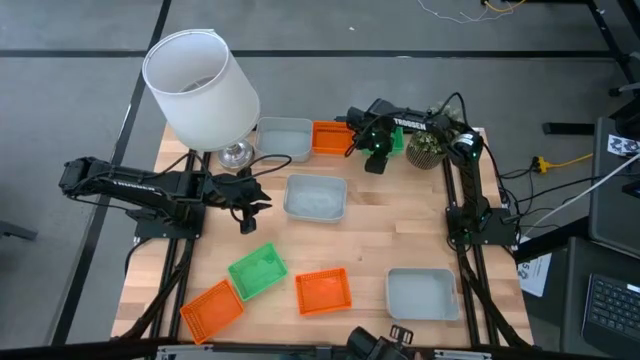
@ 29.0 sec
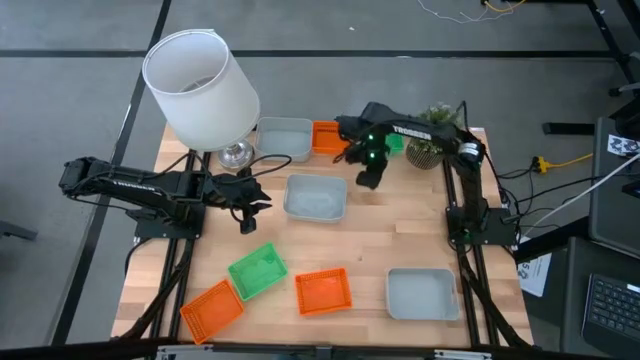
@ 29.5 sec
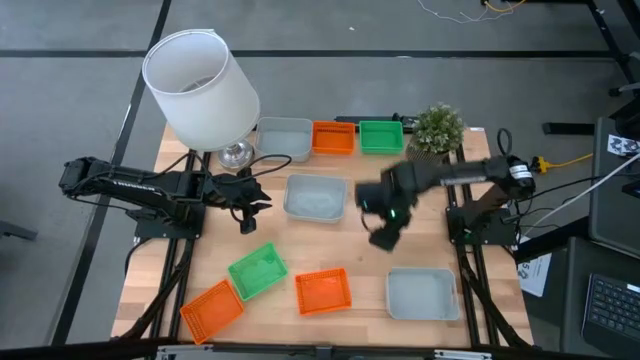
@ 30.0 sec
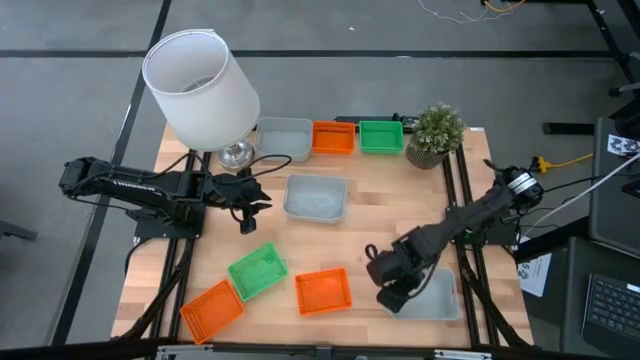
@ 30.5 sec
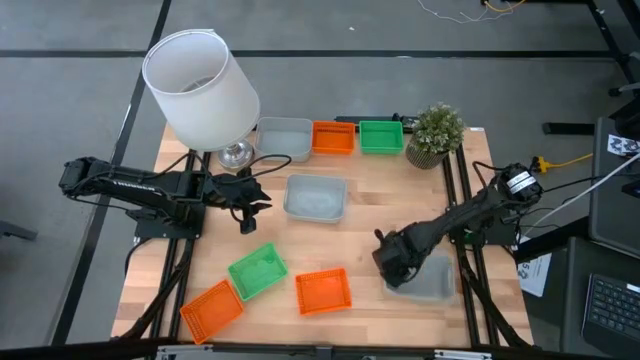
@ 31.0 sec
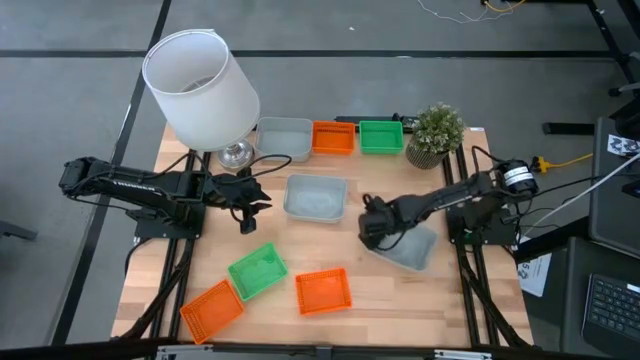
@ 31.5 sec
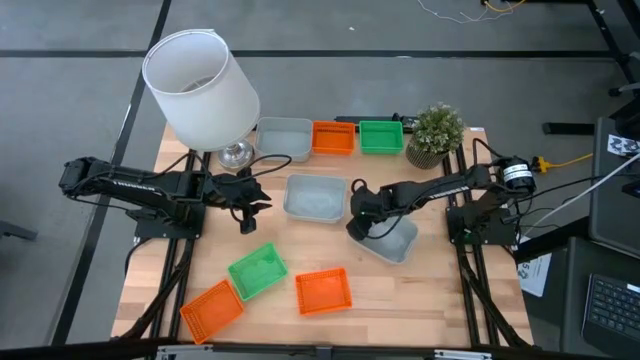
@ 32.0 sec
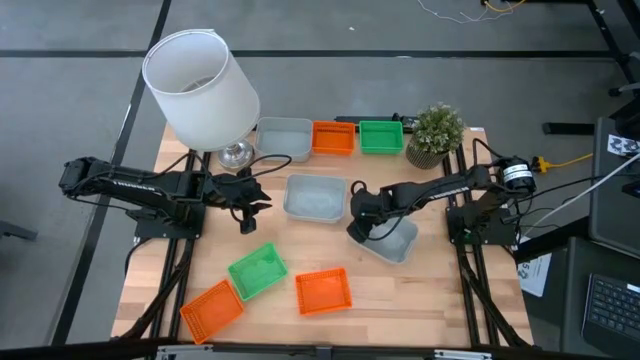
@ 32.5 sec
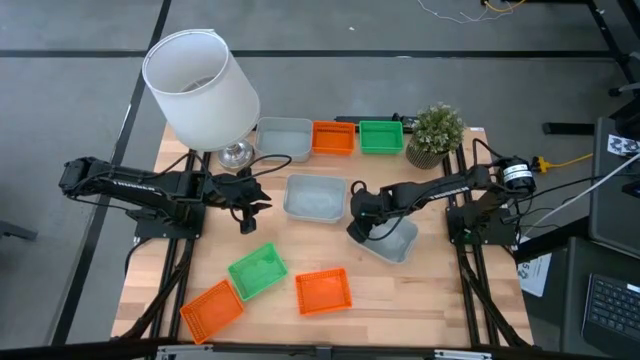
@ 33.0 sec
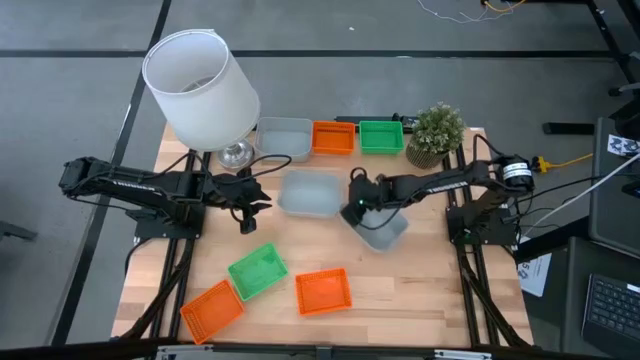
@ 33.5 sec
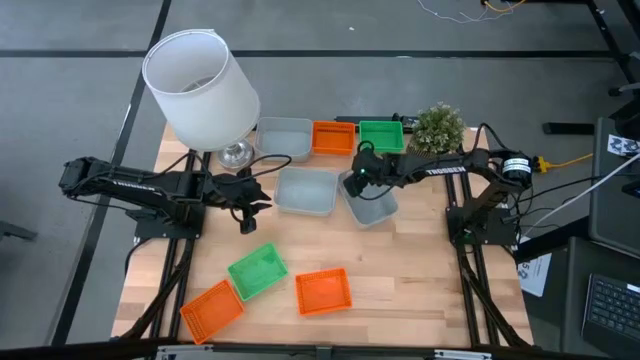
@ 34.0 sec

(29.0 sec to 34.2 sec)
Move the bottom gray bin to the top of the table

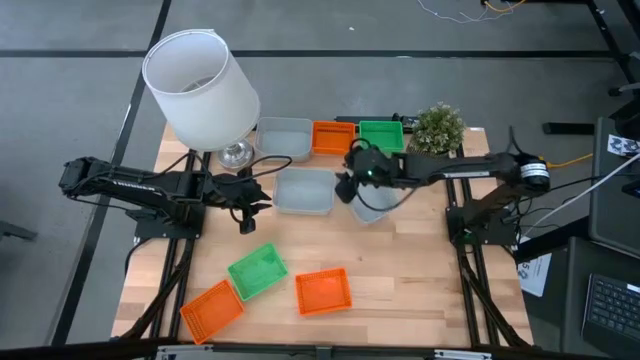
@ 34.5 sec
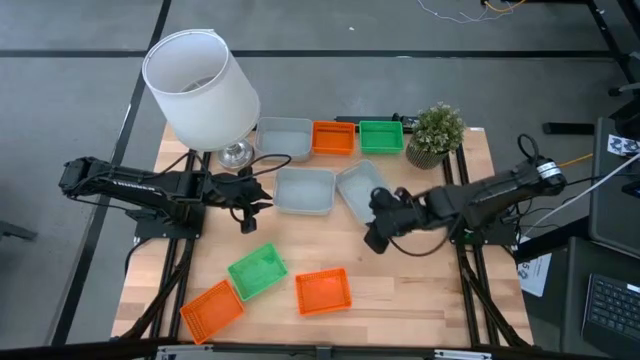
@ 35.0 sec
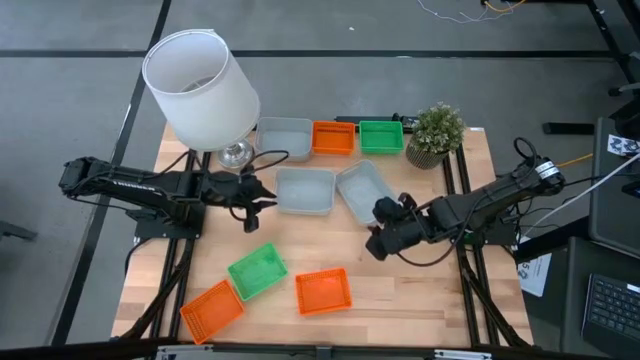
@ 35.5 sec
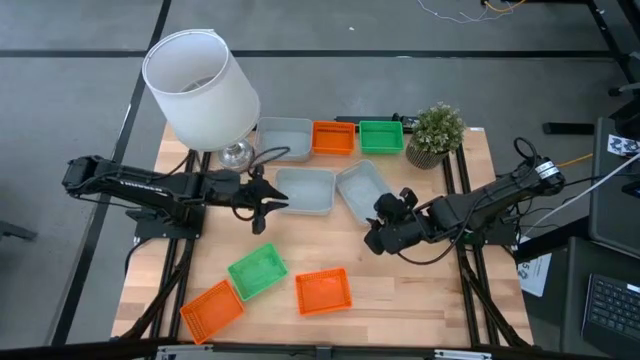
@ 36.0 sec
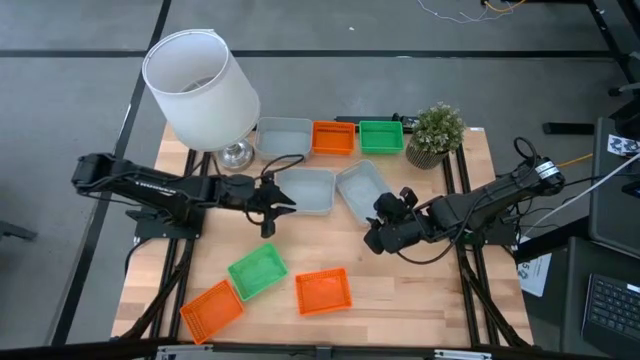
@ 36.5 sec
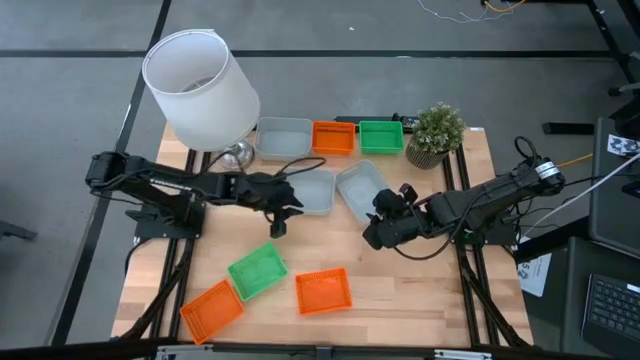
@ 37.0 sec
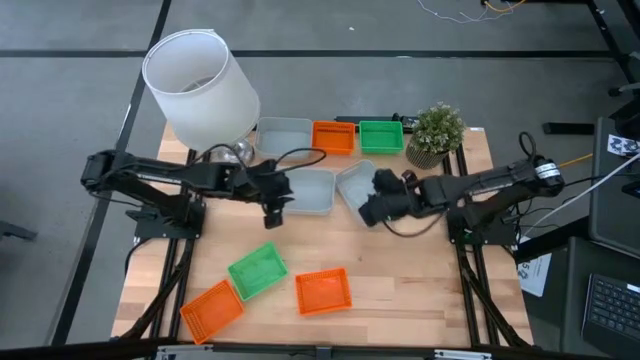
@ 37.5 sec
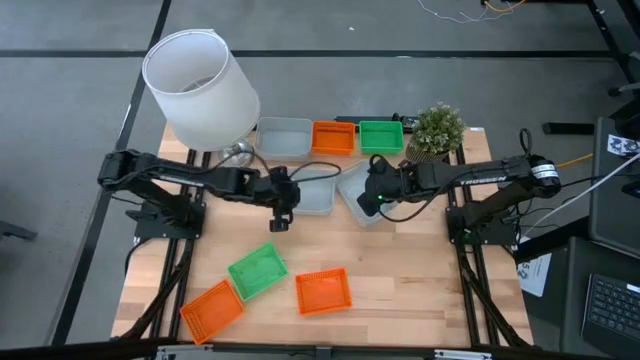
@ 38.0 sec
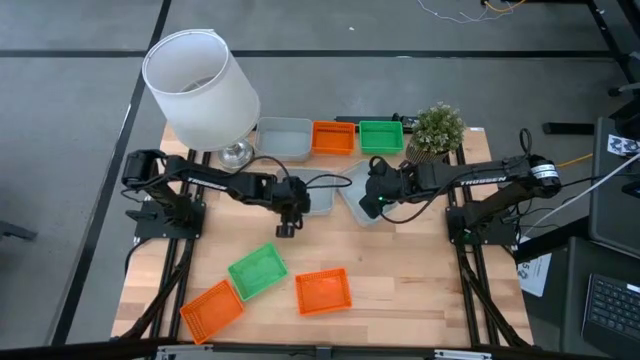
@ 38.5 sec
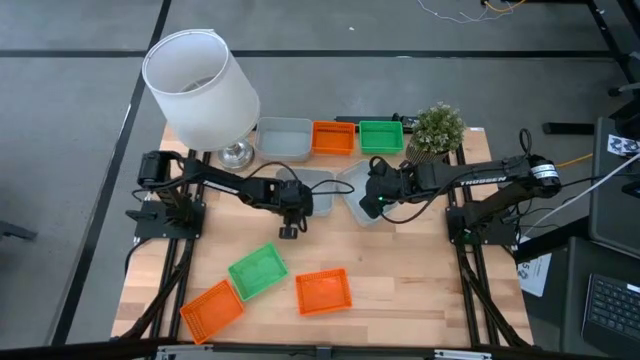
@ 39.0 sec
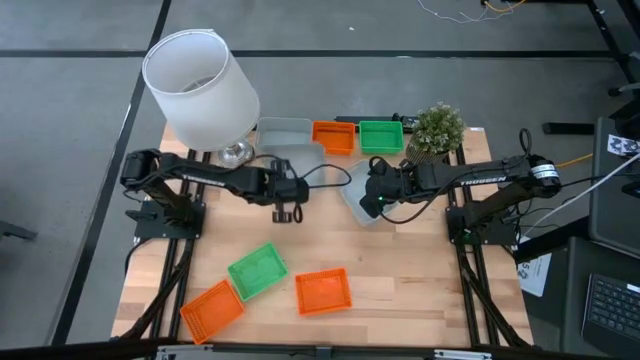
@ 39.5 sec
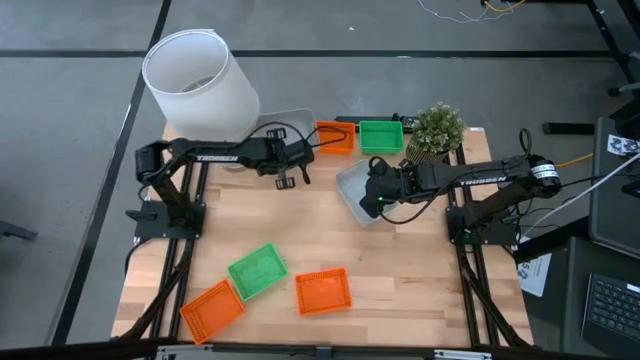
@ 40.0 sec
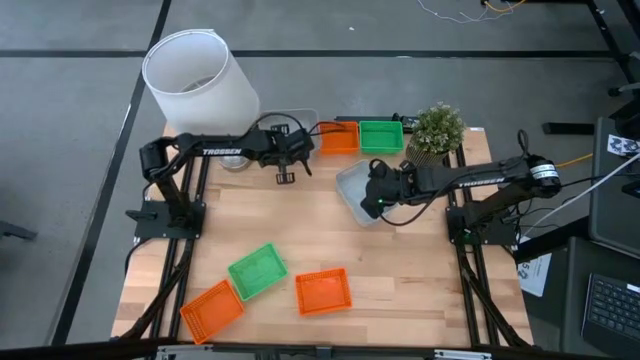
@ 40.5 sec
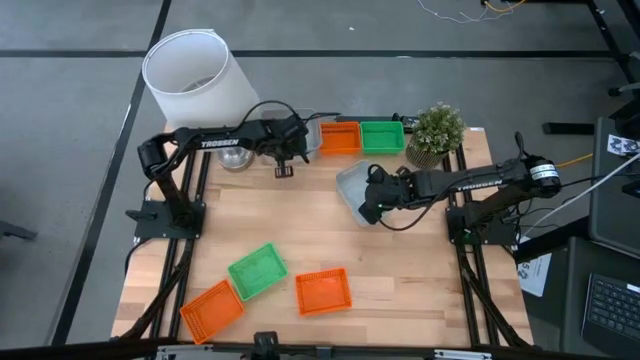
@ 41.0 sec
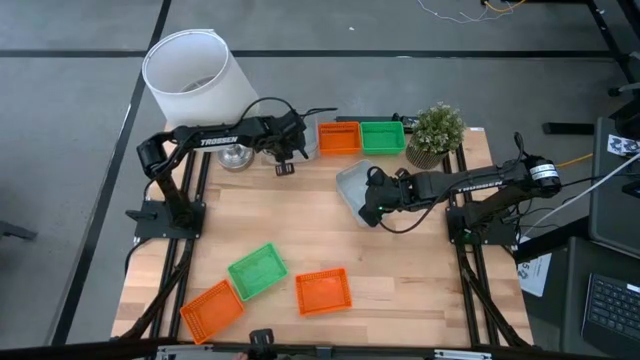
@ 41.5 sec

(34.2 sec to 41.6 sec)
Stack the bottom left gray bin on top of the top gray bin

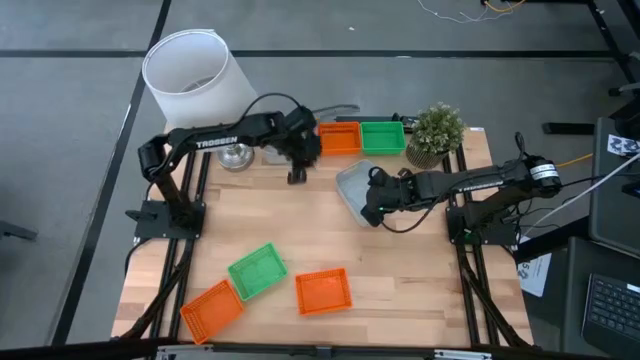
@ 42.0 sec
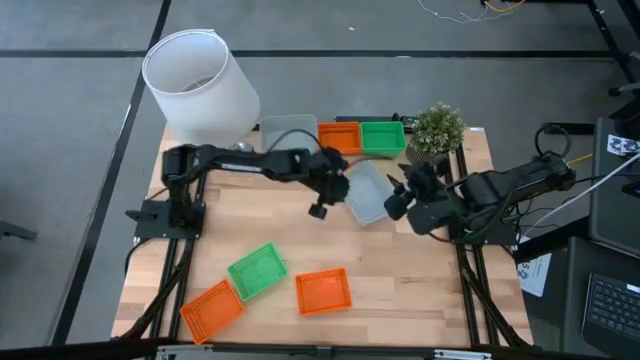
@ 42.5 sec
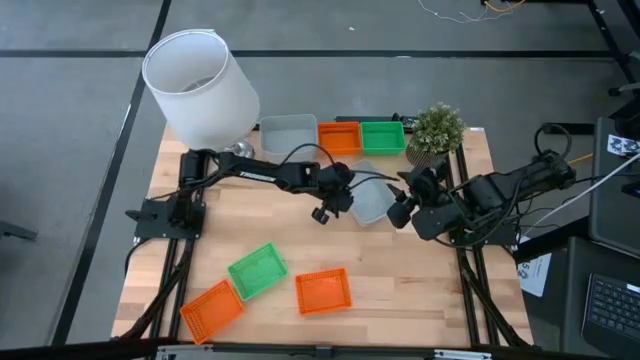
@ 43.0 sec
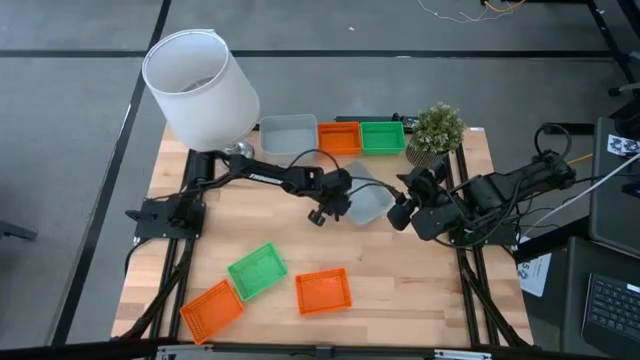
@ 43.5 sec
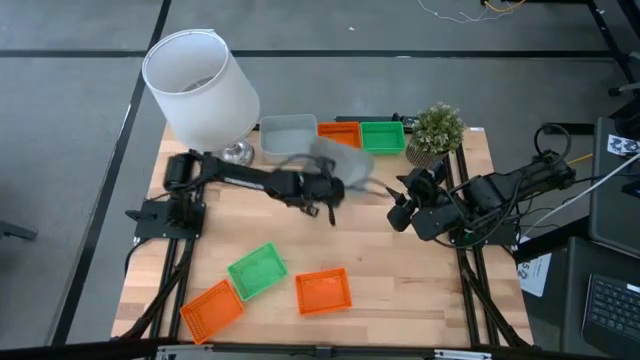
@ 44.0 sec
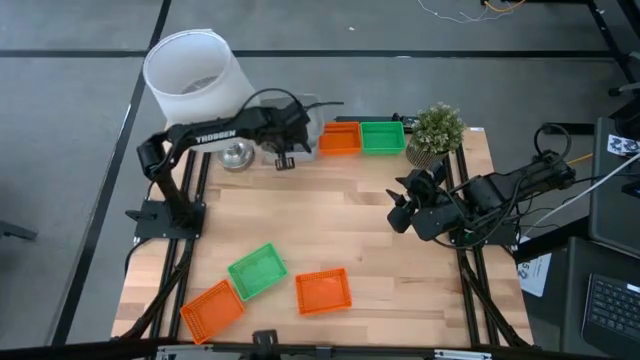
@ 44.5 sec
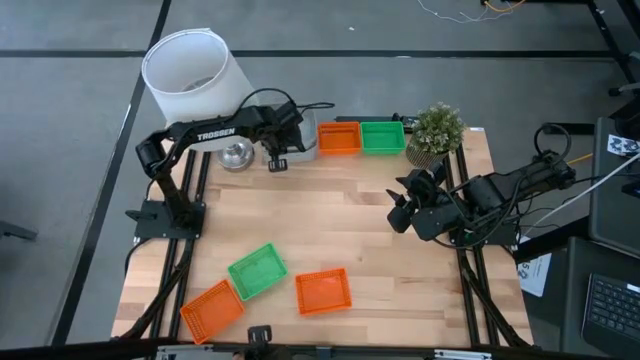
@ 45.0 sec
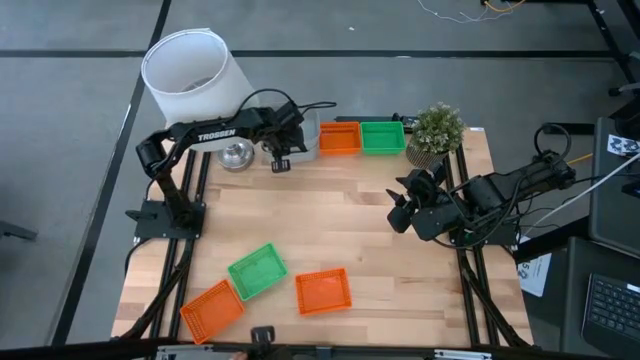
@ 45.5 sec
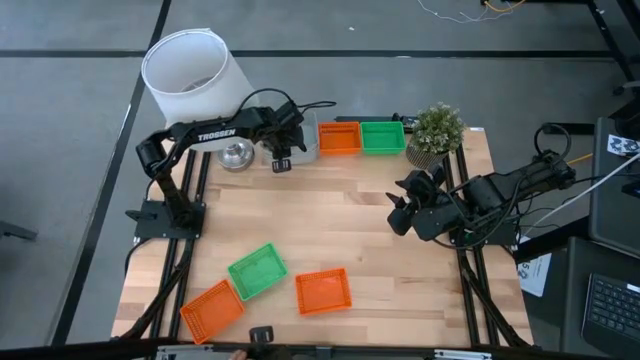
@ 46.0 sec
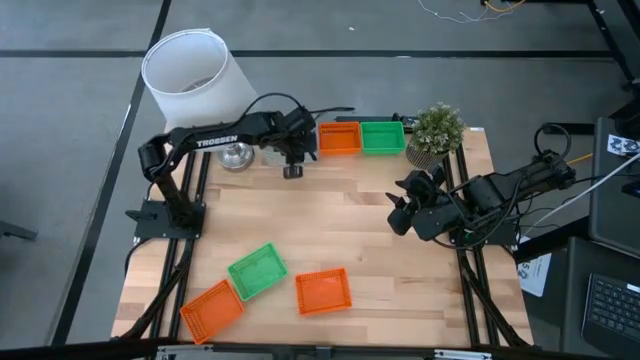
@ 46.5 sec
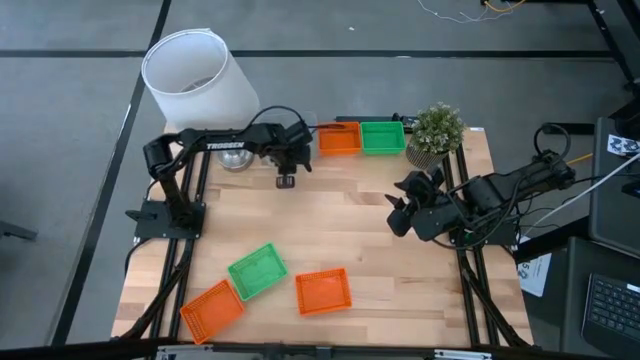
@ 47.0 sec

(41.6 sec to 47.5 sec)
Stack the bottom gray bin on top of the top gray bin

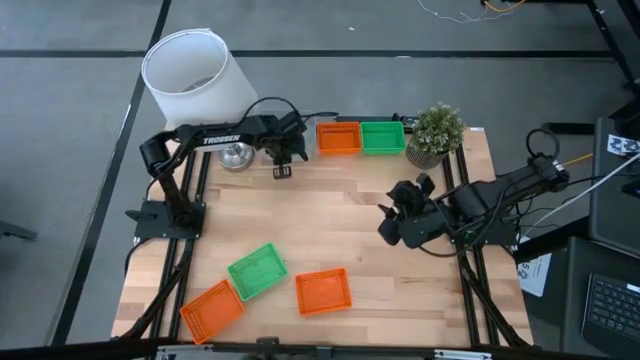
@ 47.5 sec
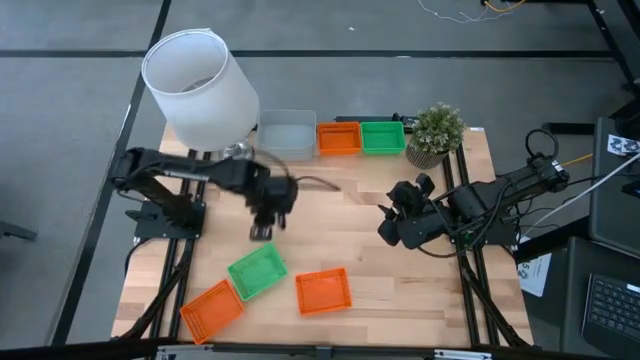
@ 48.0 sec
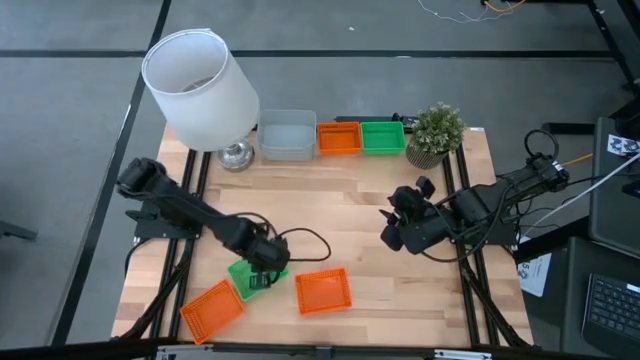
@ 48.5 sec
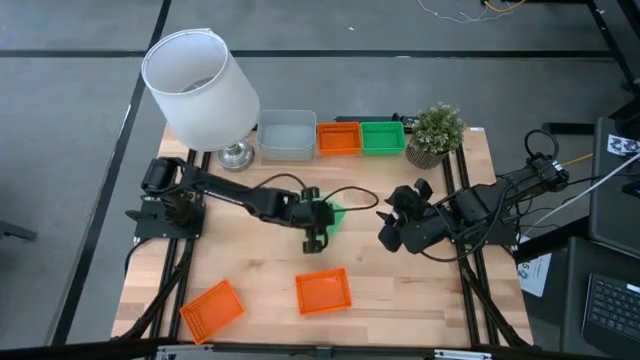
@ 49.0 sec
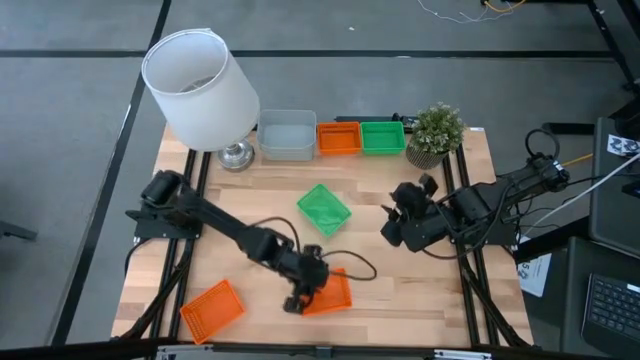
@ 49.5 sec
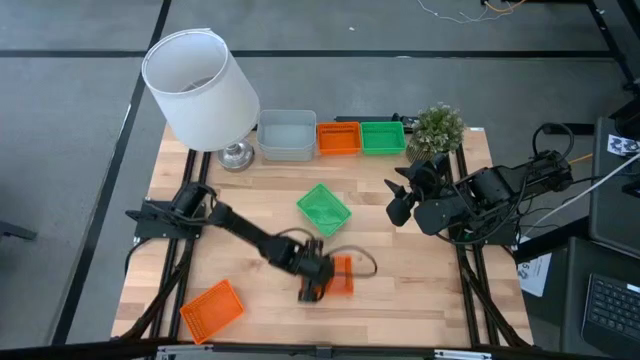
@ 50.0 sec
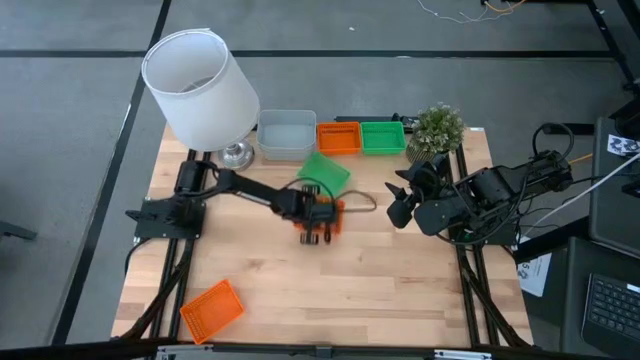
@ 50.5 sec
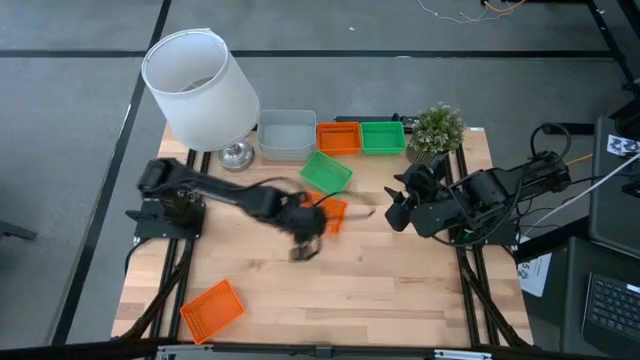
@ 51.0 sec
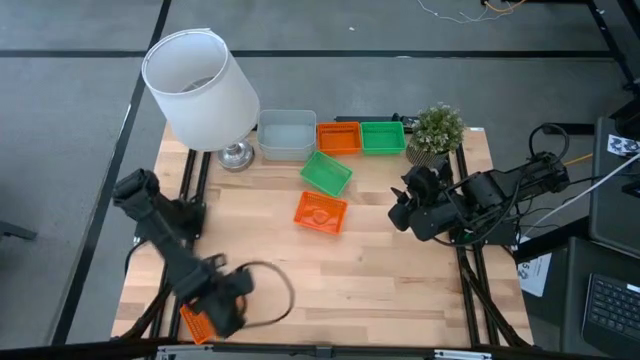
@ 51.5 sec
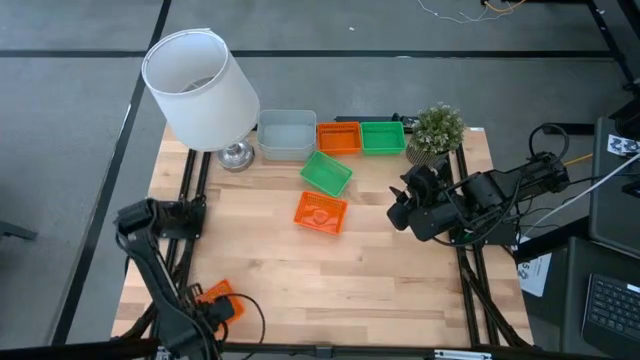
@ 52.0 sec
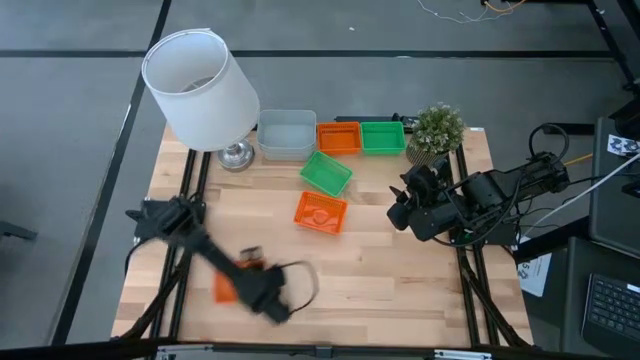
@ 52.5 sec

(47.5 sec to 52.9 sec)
Move the bins to the top of the table
